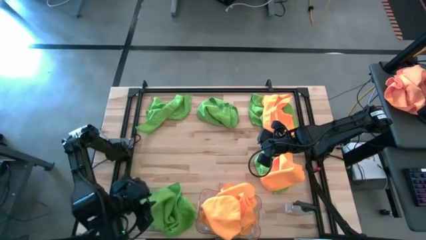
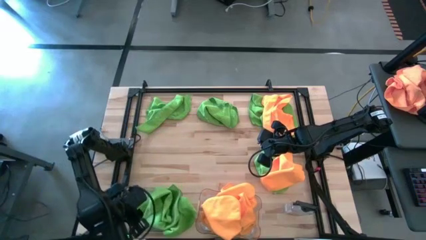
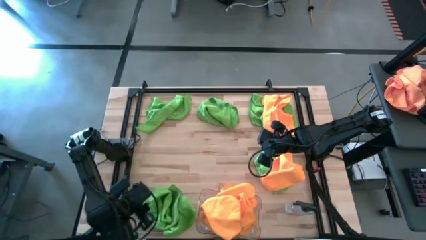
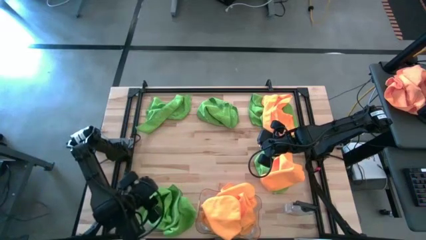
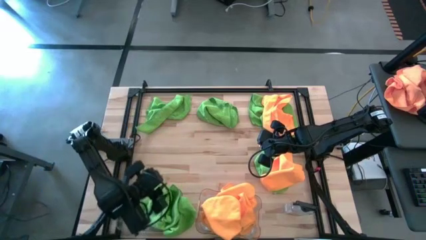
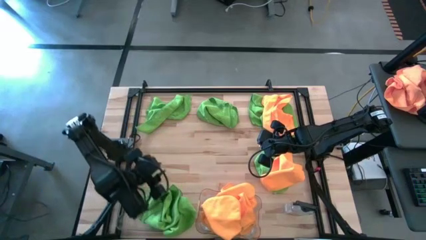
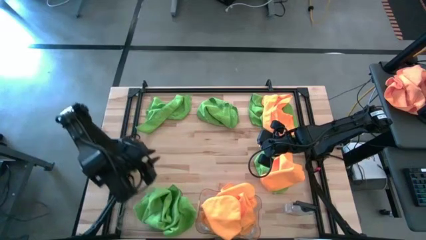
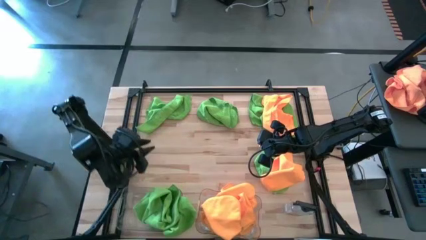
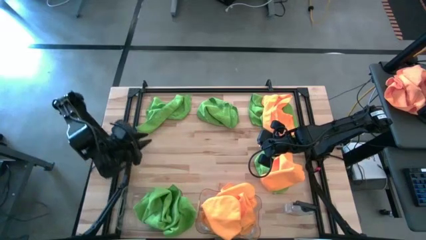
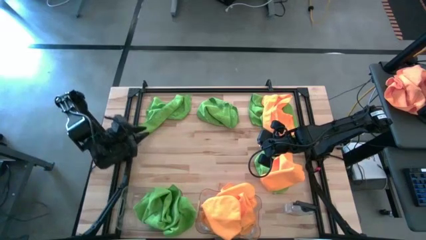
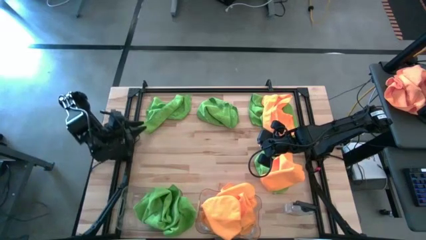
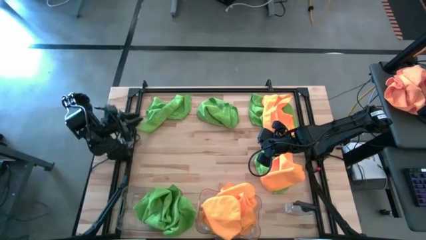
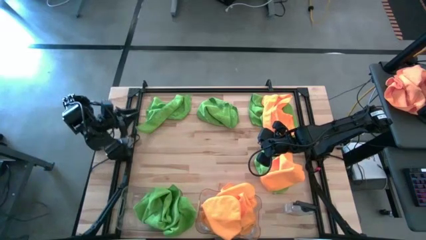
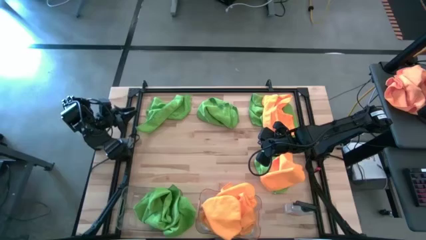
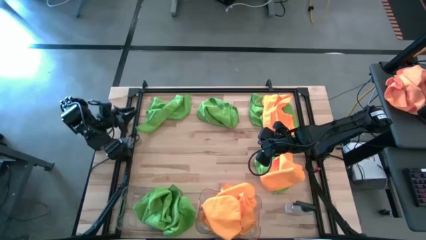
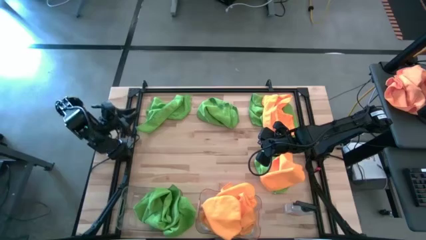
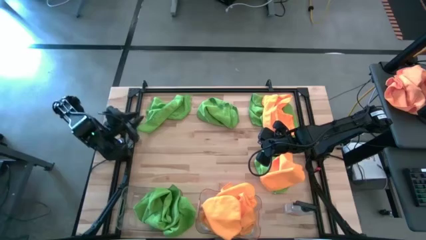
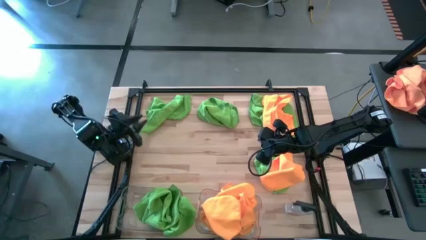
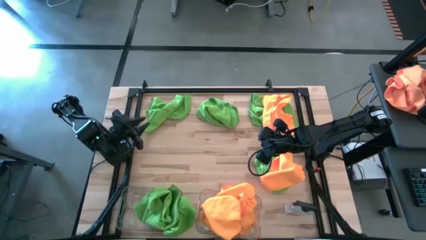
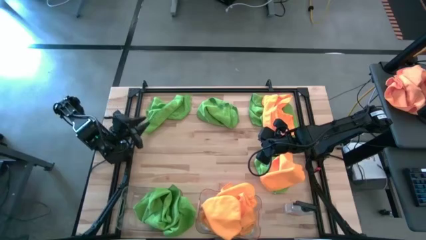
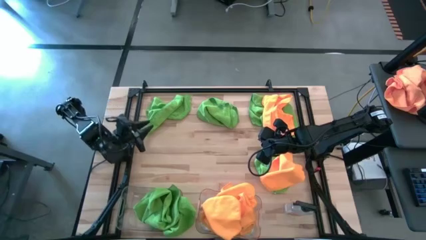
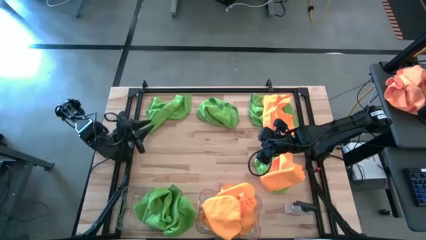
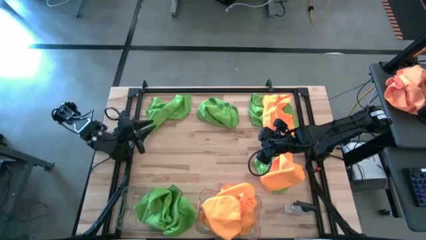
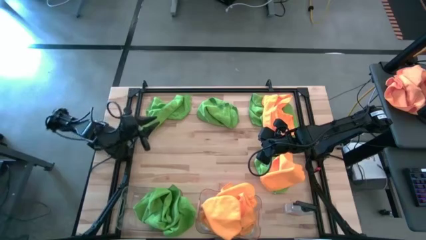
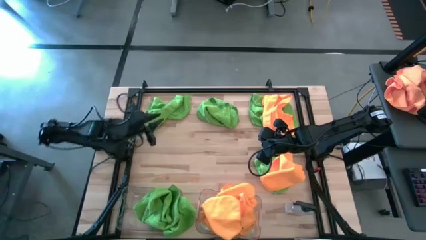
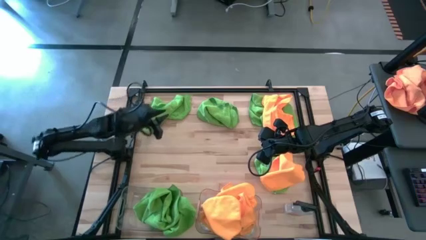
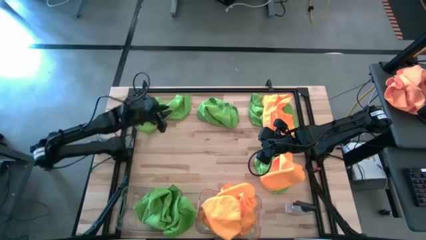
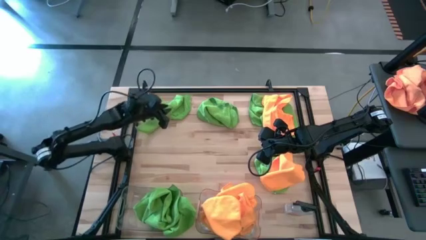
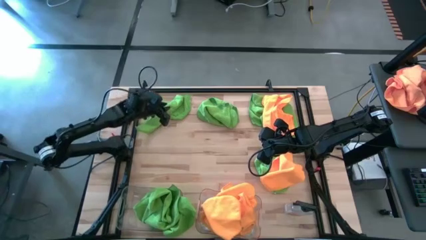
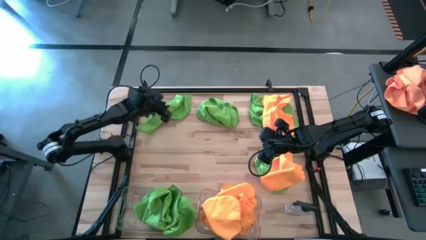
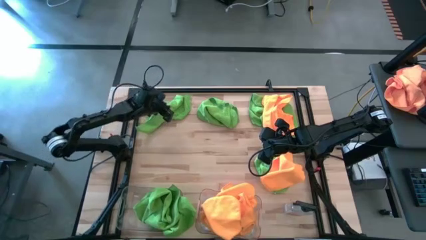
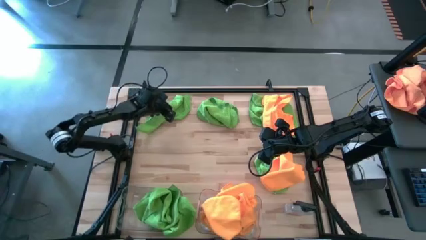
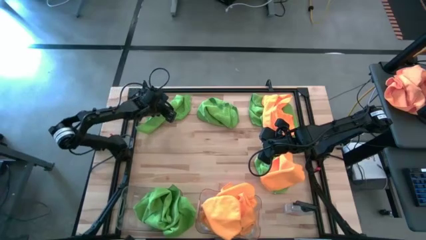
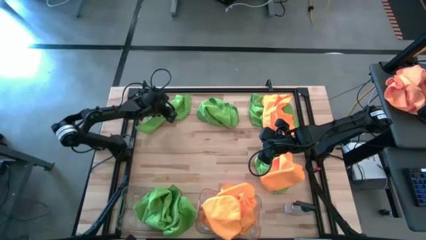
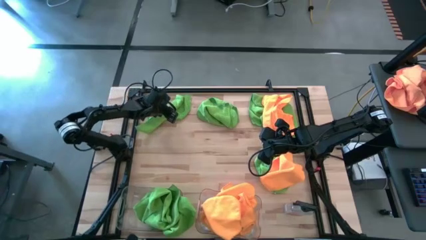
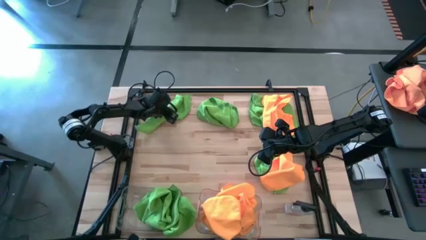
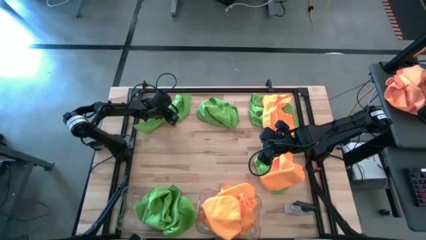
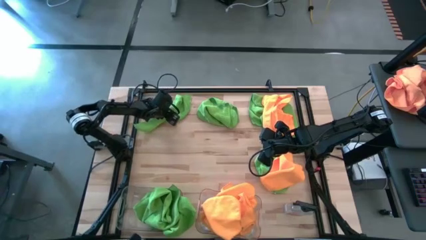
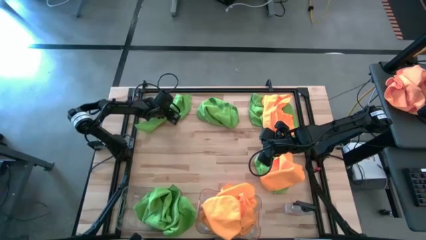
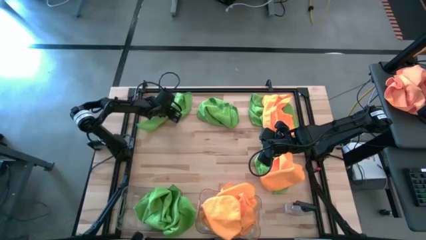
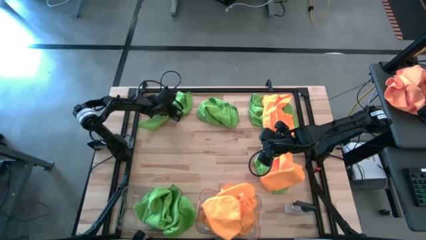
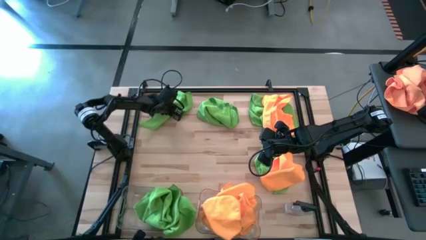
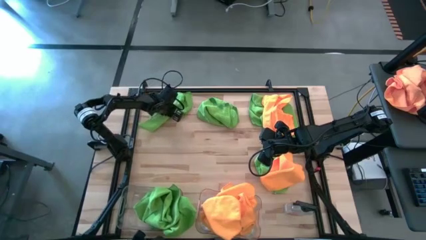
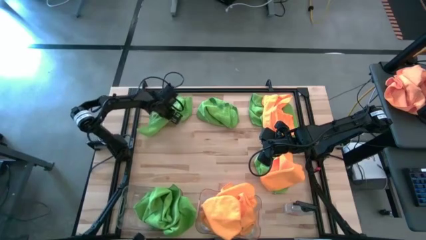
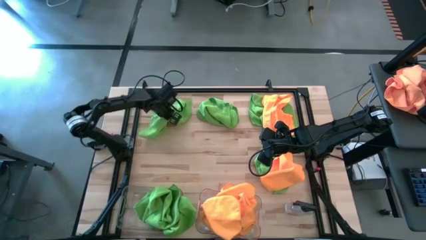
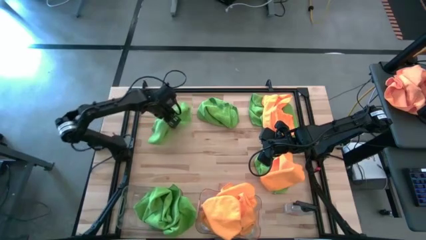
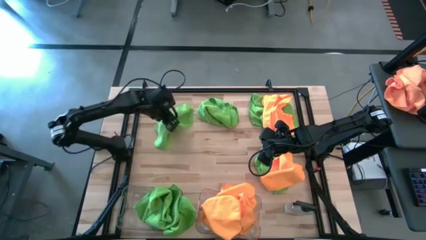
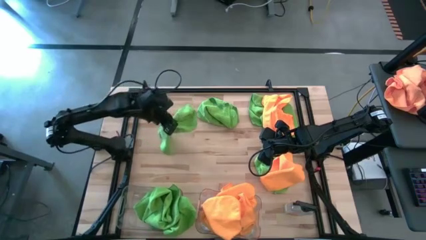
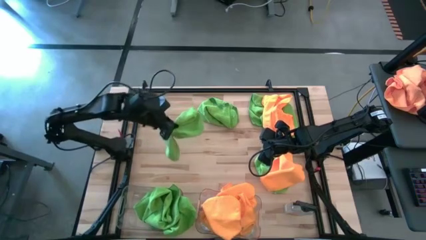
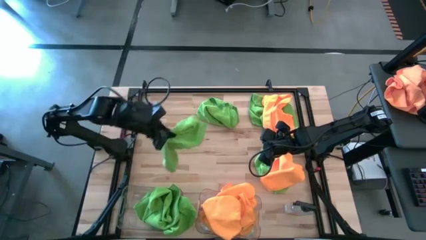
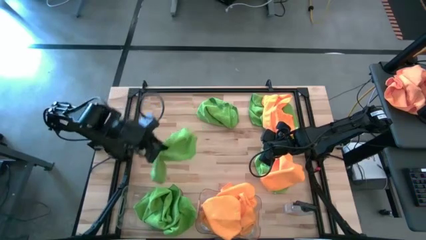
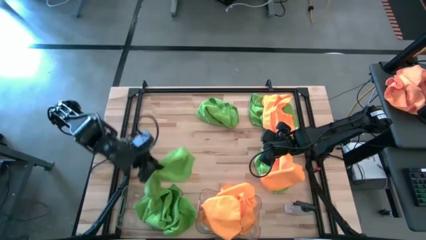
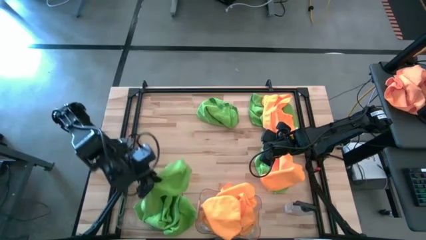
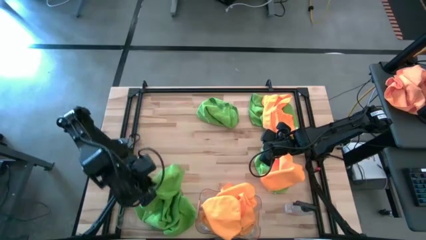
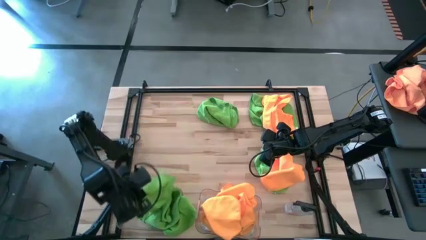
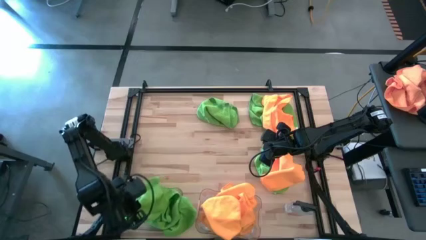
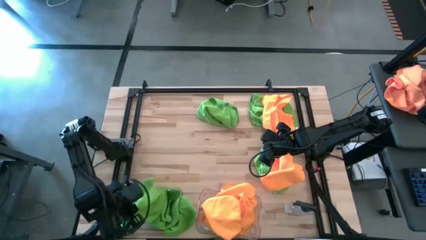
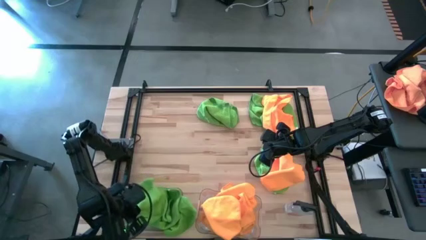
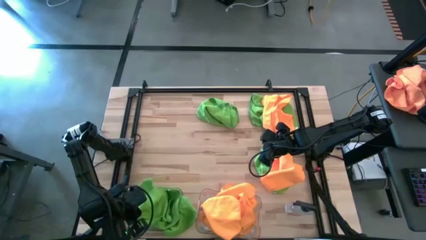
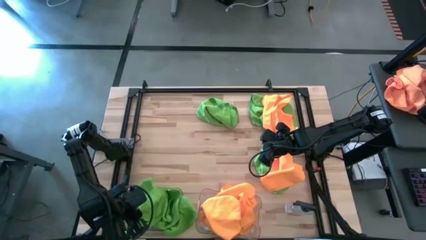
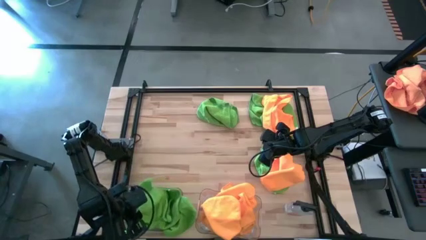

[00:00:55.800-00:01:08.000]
Task: Sort microfiber towel by color & place in baskets
Put the green towel into the left transparent bin
